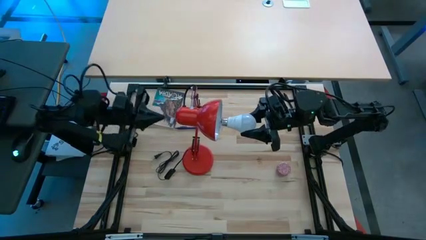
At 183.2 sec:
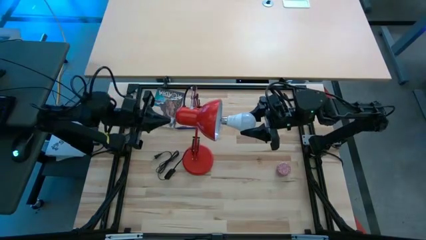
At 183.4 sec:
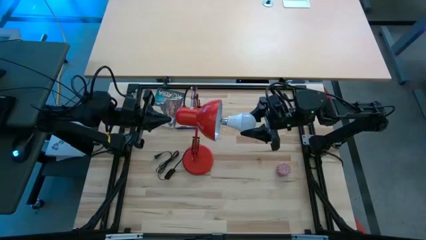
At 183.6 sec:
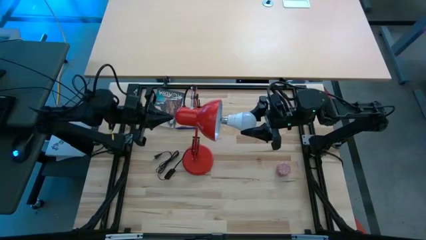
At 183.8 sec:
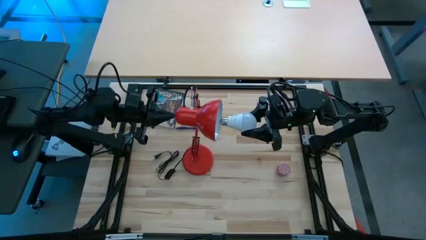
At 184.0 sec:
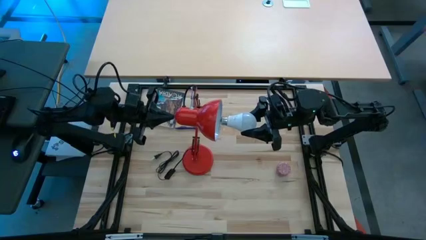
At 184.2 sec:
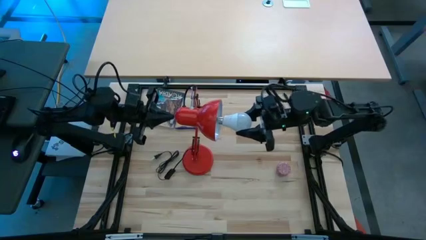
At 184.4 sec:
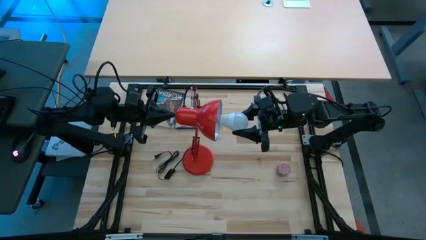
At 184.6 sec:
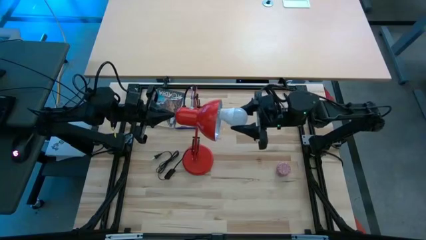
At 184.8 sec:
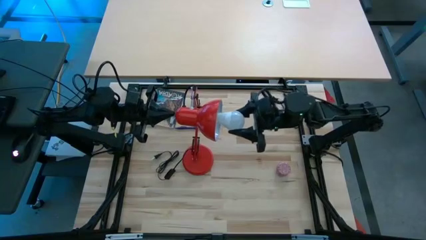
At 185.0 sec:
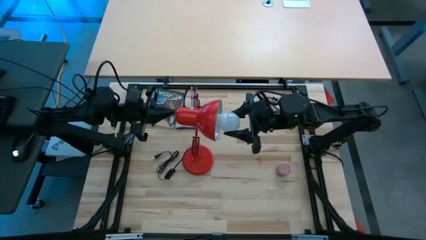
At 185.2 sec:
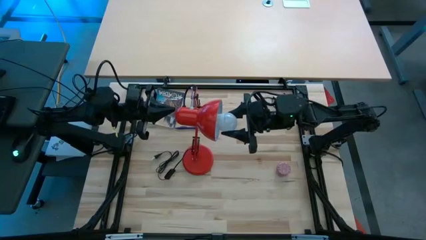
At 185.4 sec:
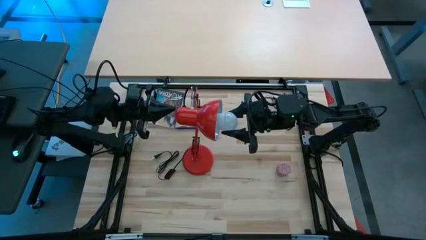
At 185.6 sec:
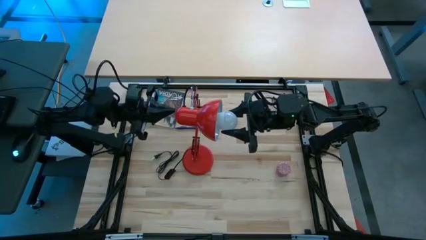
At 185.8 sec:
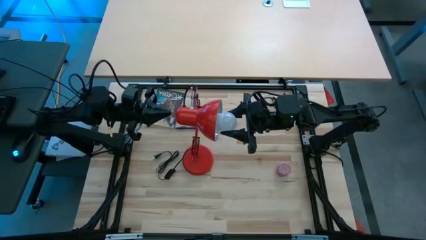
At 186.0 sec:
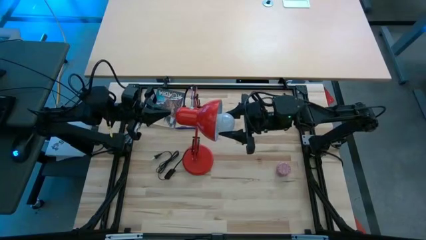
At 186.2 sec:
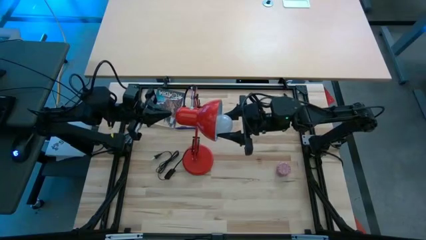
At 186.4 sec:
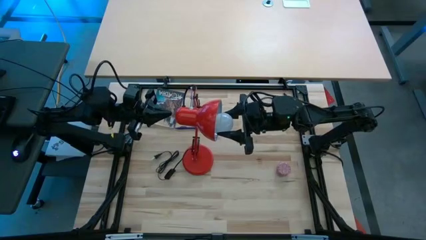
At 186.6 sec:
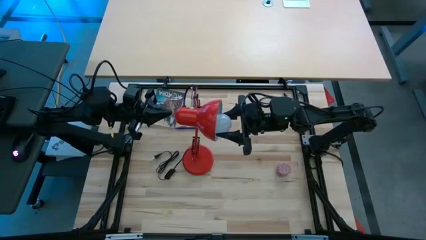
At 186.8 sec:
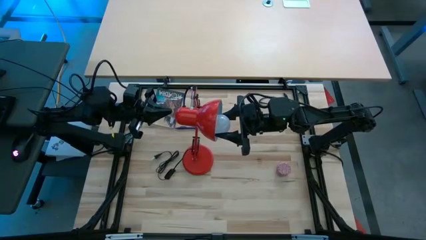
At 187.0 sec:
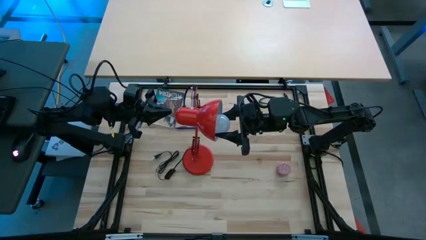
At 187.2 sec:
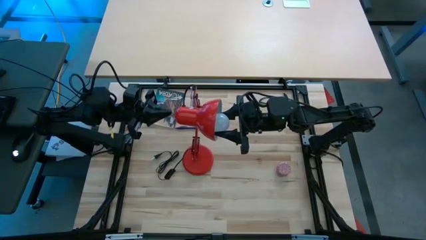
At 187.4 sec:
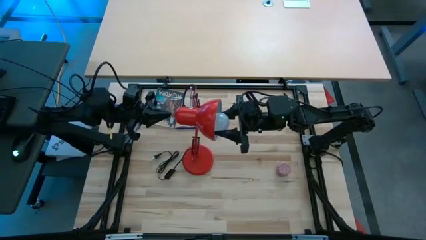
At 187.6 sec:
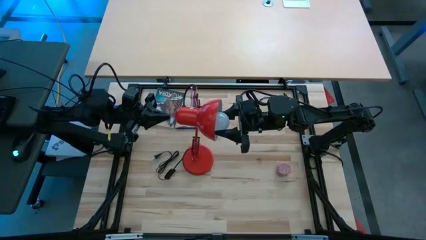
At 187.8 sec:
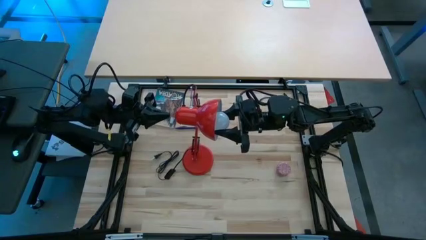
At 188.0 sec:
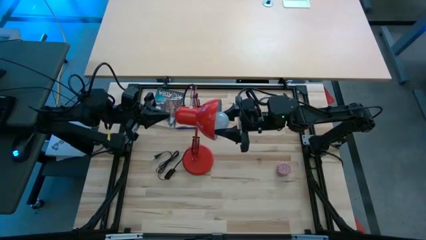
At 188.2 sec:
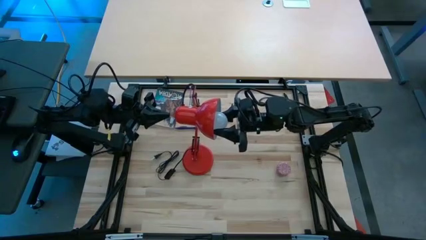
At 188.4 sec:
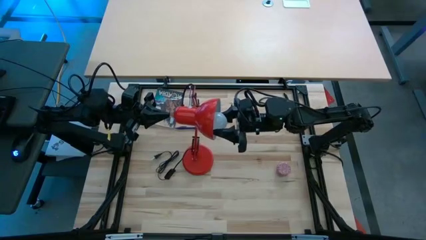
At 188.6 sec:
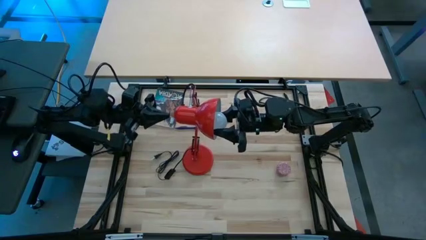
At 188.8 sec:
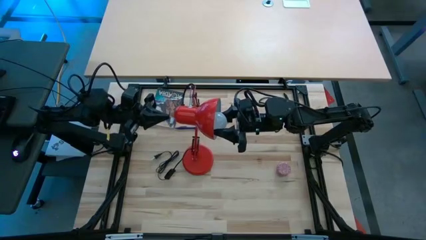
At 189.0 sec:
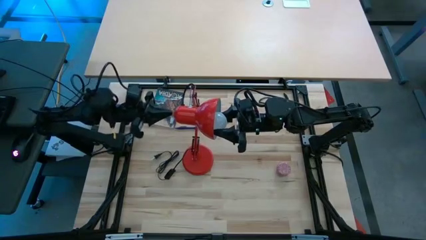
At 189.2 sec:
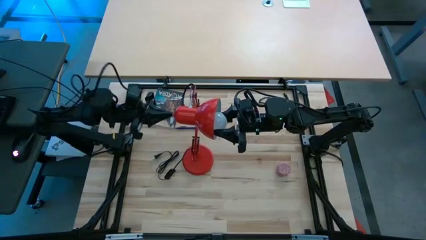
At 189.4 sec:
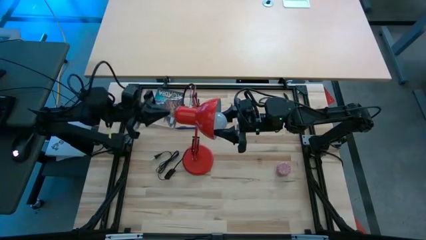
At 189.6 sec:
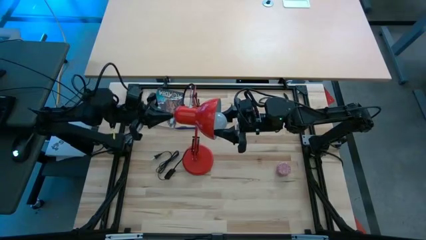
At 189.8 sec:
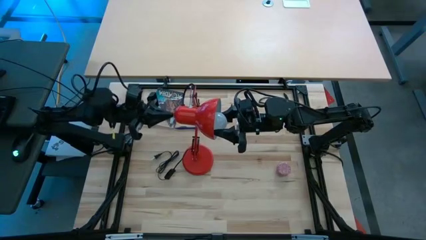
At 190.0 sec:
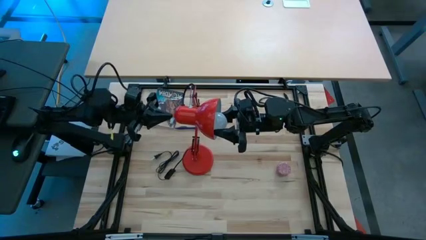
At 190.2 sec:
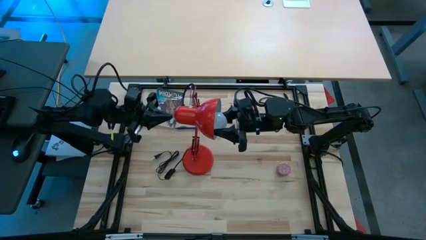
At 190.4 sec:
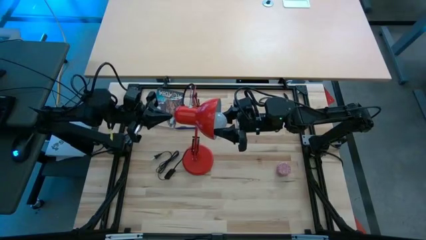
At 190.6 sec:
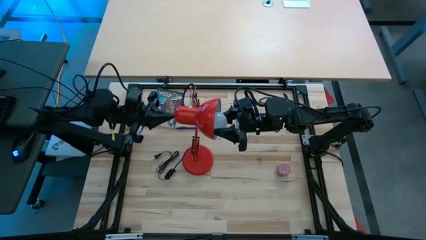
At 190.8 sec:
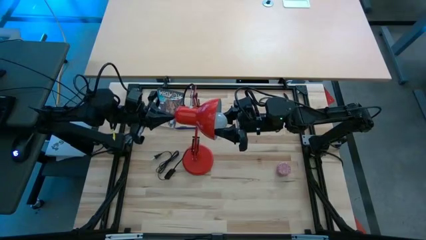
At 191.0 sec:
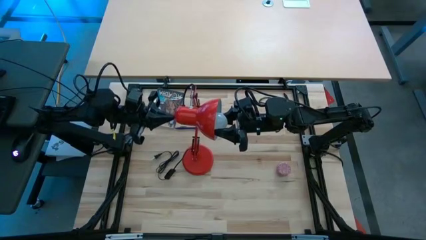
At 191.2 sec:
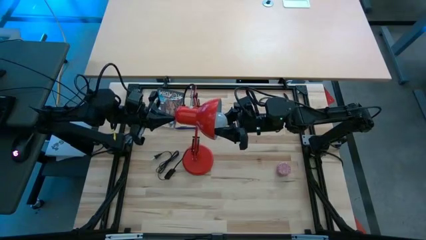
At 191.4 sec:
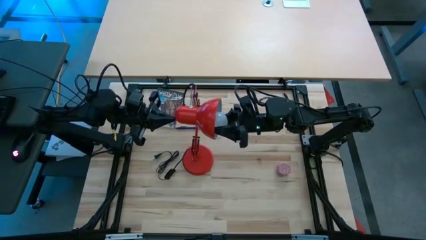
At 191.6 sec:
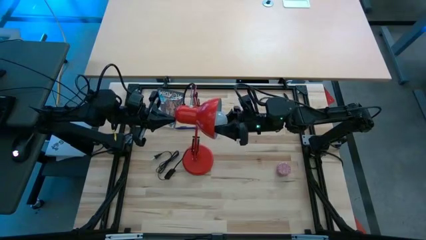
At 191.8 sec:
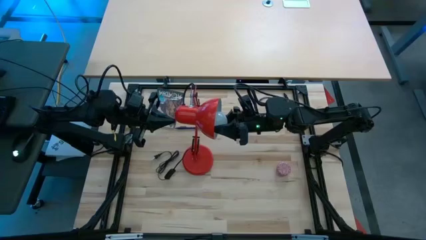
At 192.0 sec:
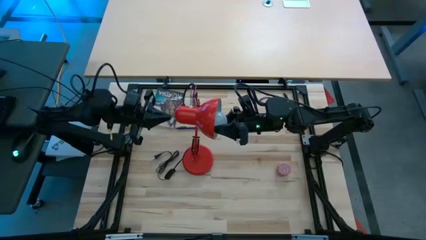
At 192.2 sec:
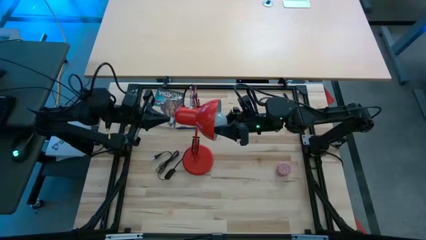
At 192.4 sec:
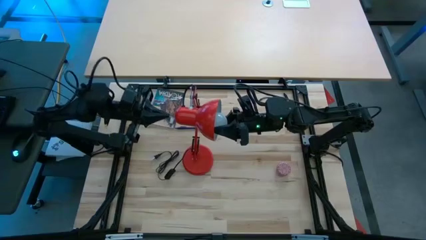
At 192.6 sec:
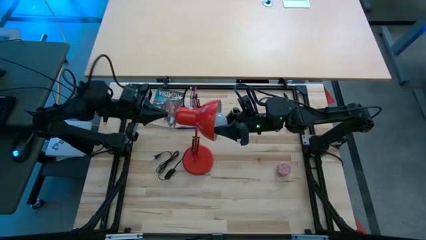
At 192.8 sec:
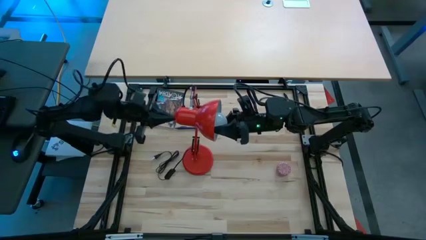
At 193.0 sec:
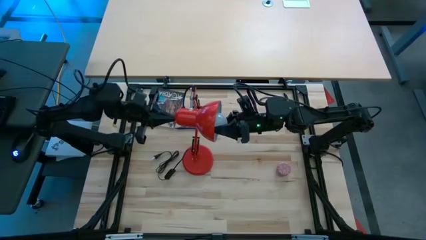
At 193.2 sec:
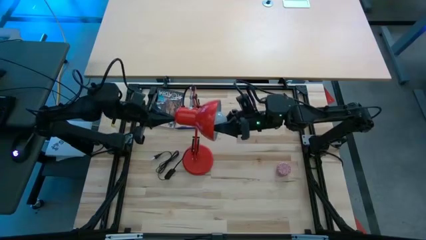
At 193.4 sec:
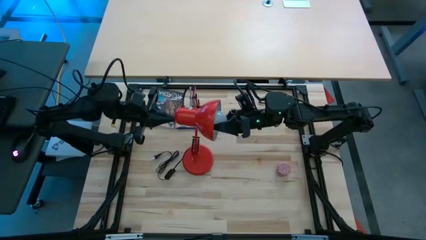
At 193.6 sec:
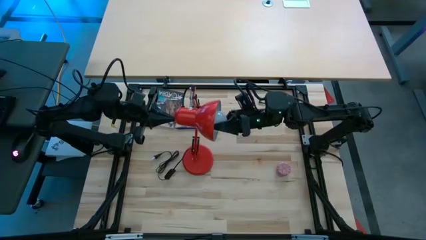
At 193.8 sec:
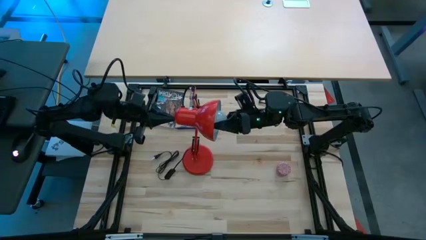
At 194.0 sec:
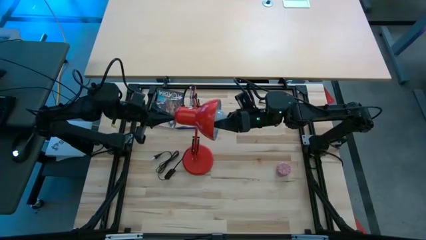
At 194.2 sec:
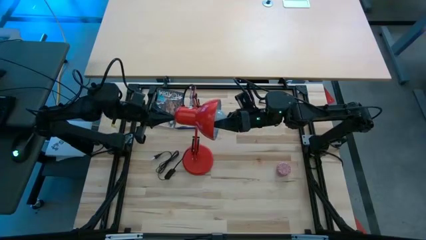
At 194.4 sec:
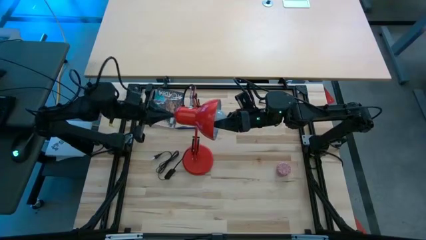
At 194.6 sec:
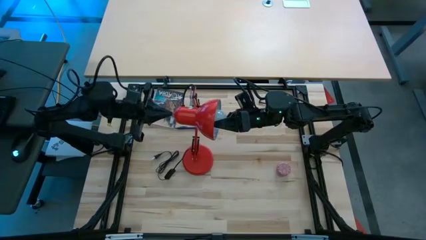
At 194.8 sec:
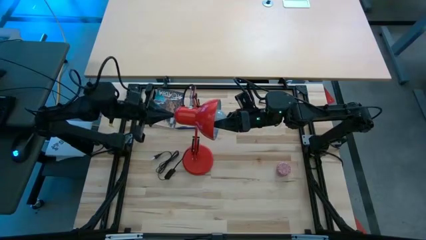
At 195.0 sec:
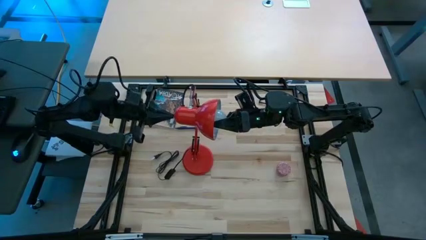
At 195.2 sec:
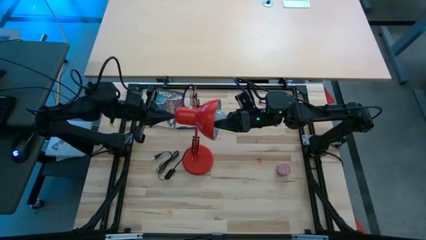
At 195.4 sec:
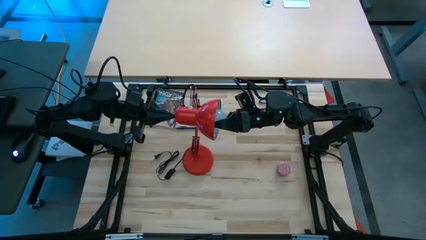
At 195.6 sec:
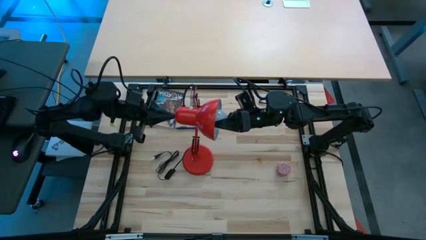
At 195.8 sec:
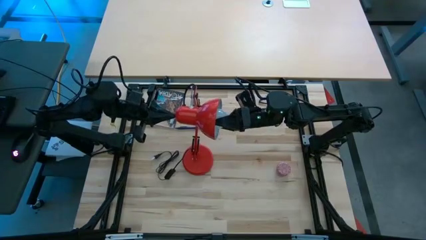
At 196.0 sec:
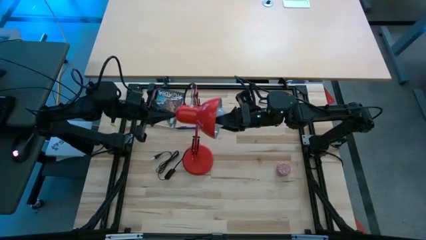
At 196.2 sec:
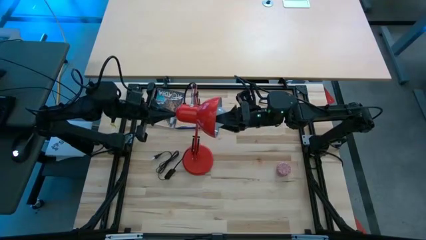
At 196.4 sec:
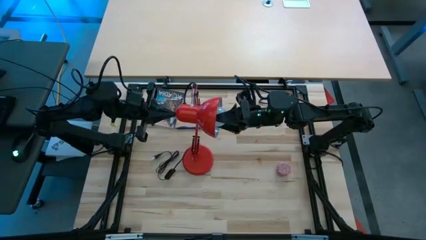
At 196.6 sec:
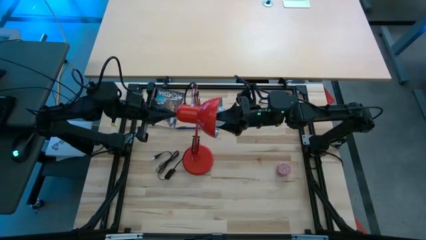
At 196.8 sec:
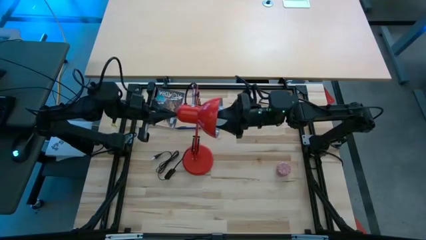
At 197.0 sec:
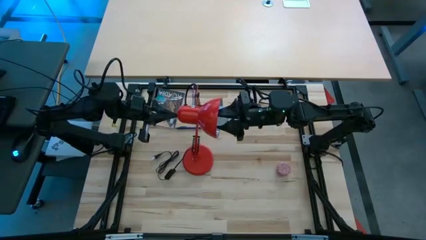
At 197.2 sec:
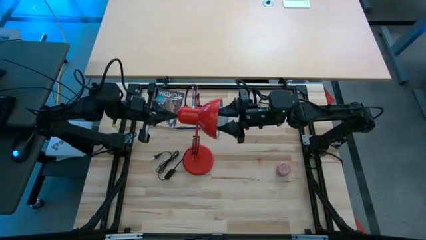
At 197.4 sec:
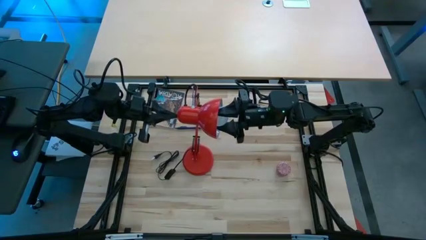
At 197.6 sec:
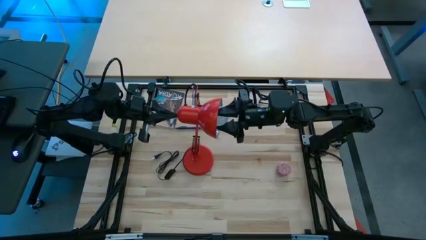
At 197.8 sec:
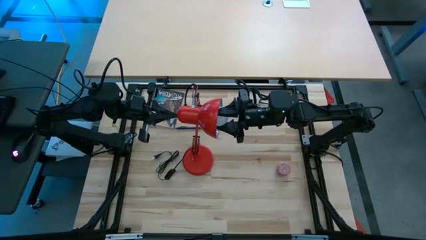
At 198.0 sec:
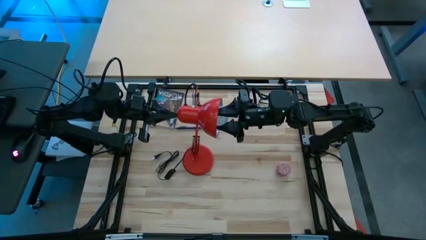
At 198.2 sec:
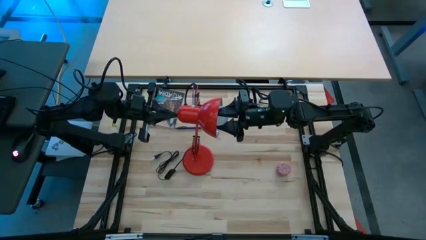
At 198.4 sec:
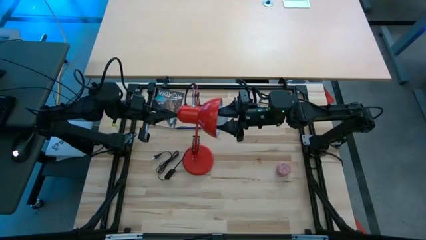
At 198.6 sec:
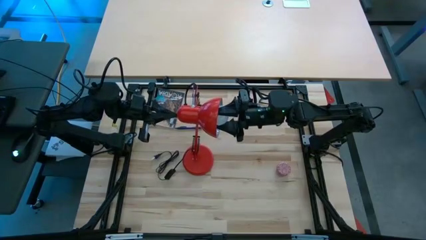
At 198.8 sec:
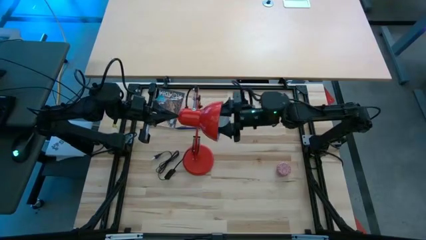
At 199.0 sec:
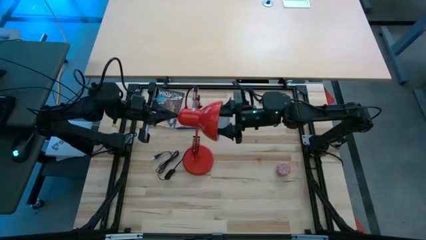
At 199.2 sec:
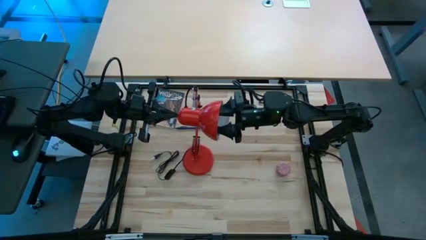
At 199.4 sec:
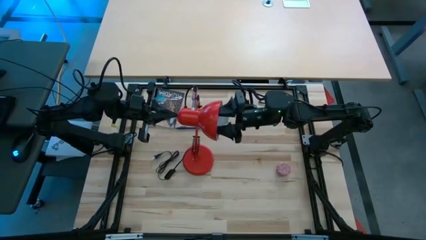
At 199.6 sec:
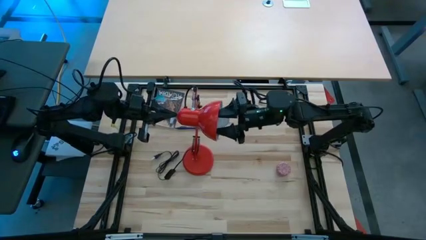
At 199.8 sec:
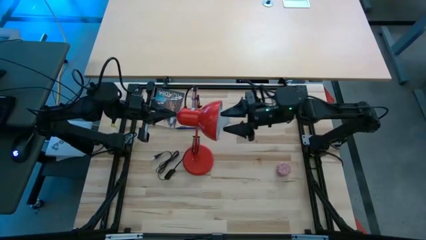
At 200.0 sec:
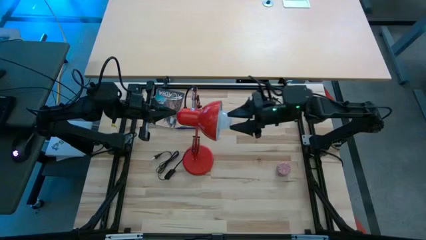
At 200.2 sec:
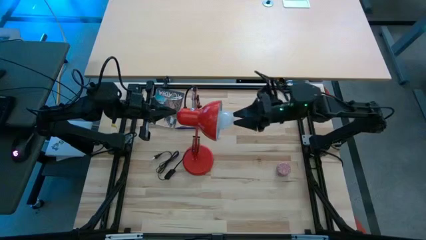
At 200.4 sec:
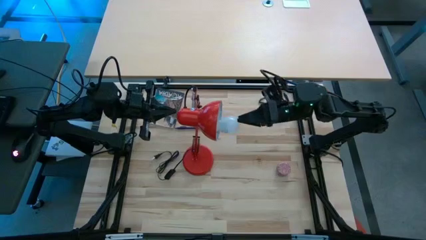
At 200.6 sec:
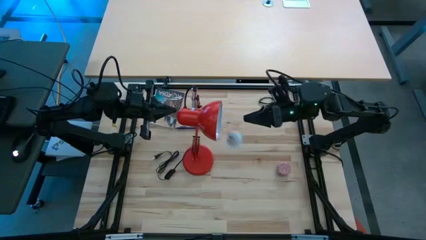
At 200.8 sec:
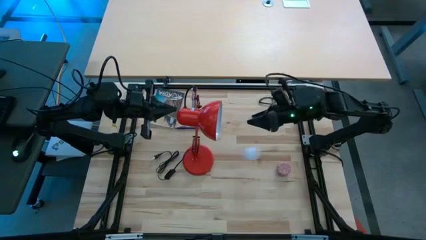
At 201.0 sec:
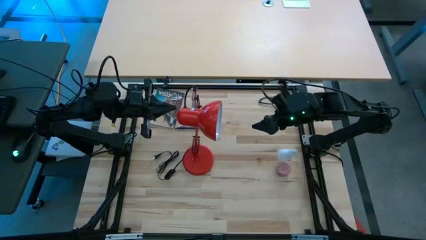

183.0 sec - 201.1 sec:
Task: Screw lightbulb
Insert the lightbulb on the lamp
